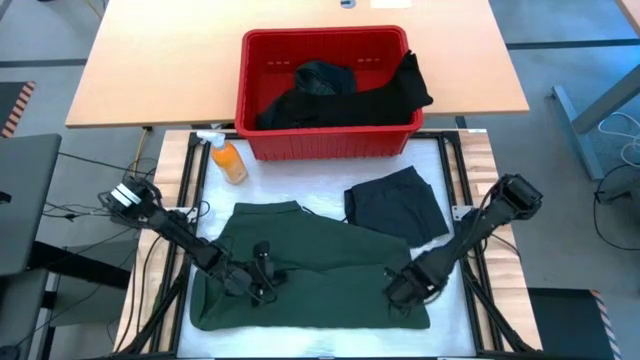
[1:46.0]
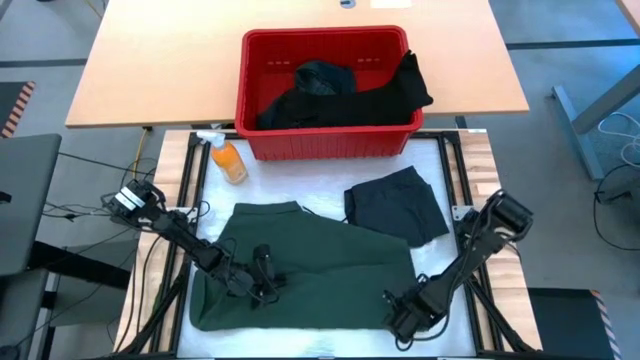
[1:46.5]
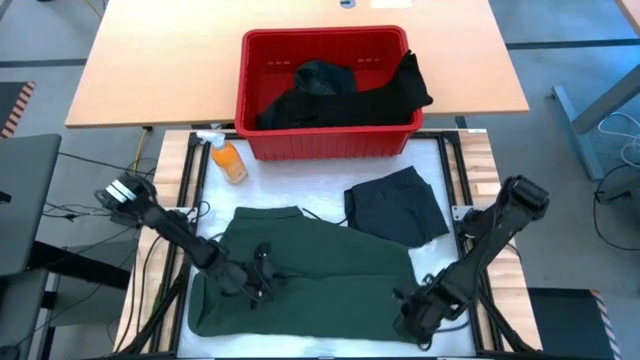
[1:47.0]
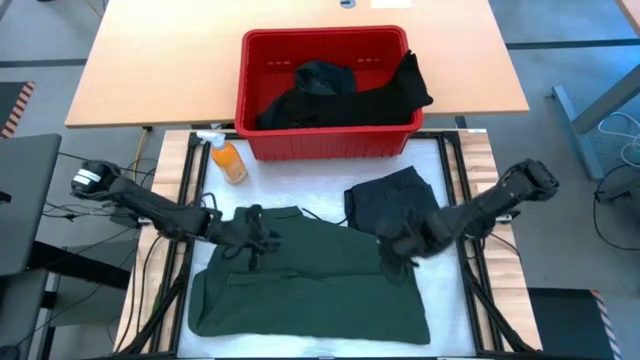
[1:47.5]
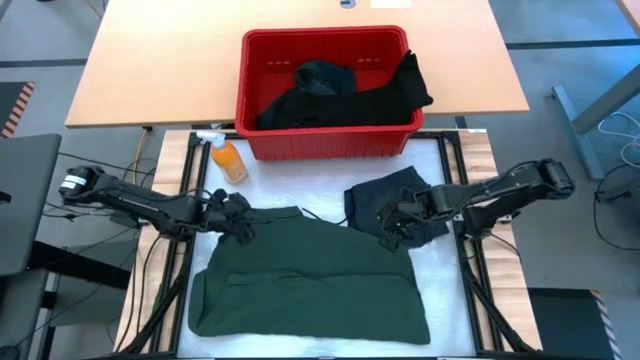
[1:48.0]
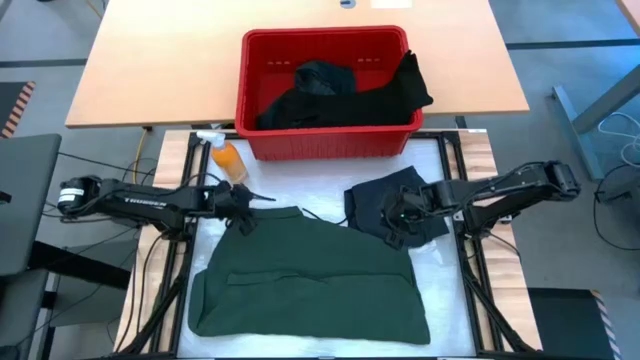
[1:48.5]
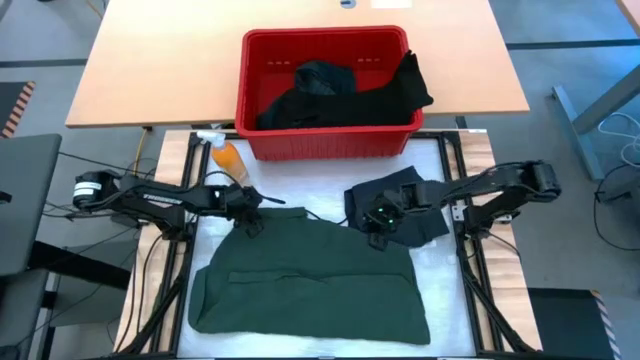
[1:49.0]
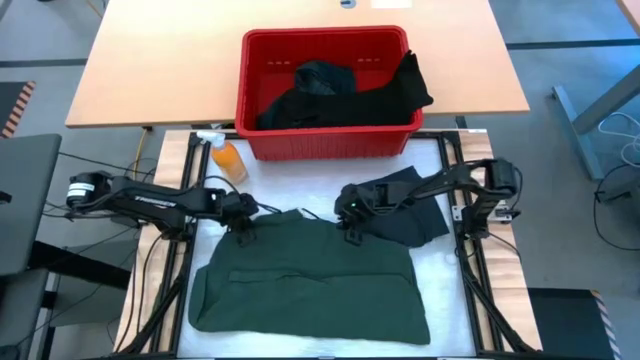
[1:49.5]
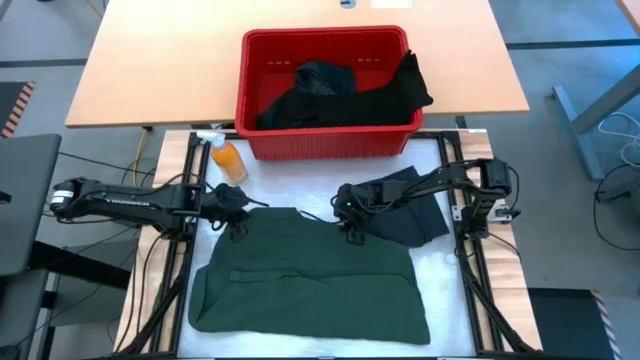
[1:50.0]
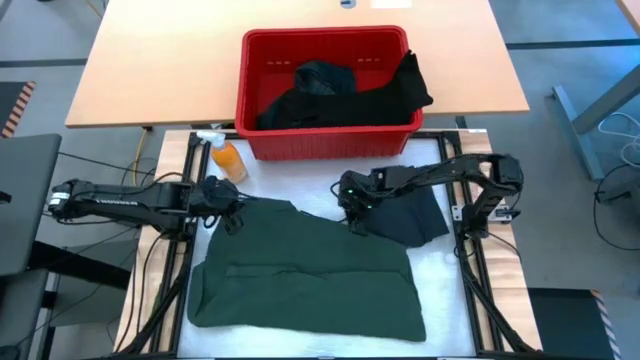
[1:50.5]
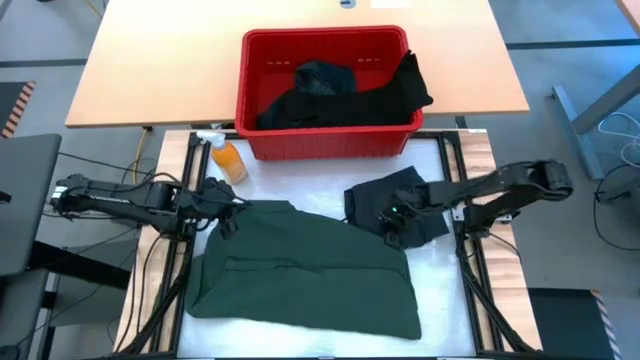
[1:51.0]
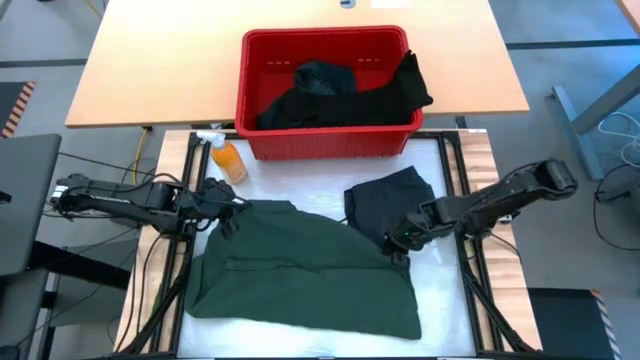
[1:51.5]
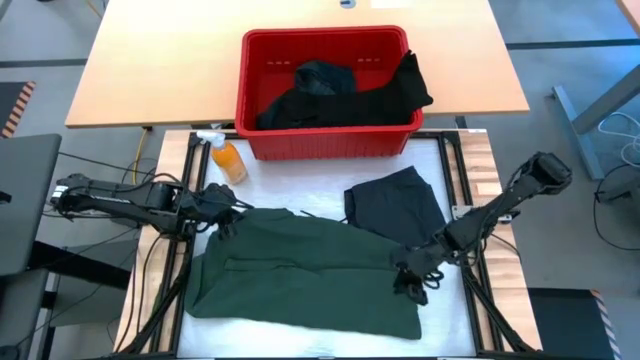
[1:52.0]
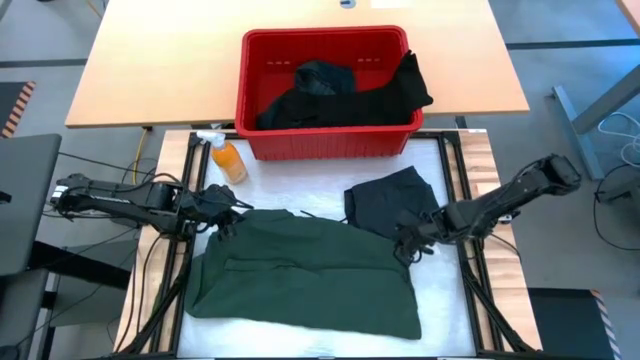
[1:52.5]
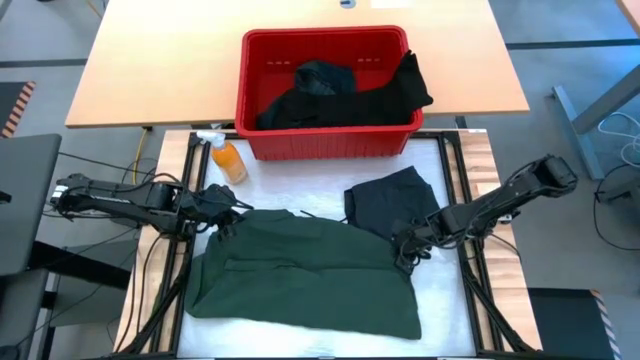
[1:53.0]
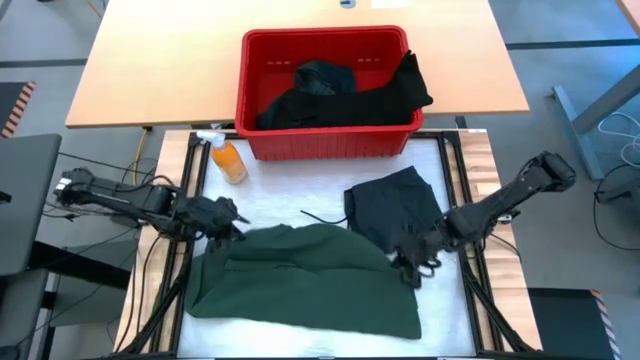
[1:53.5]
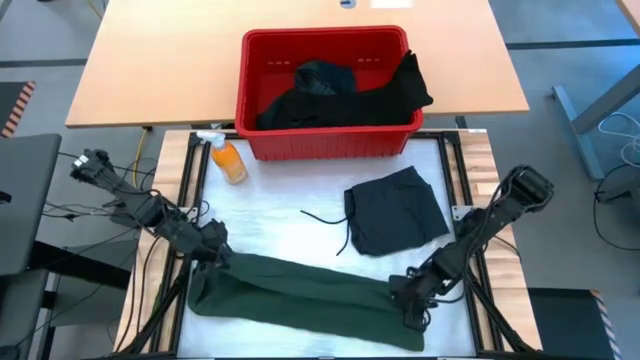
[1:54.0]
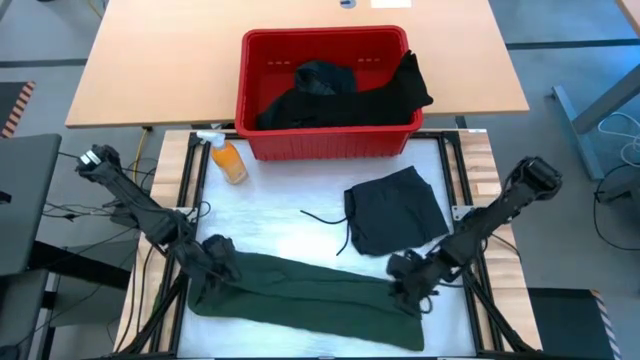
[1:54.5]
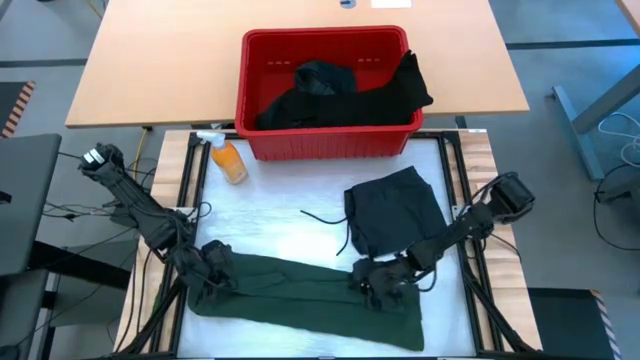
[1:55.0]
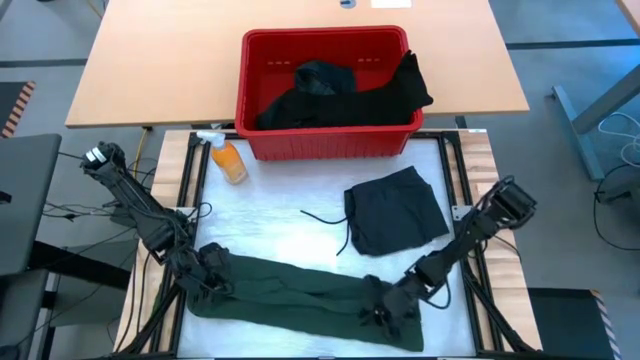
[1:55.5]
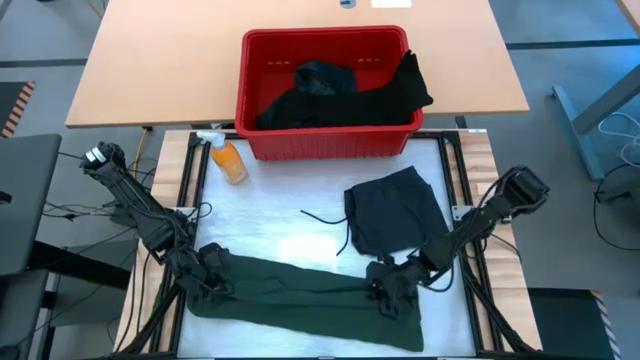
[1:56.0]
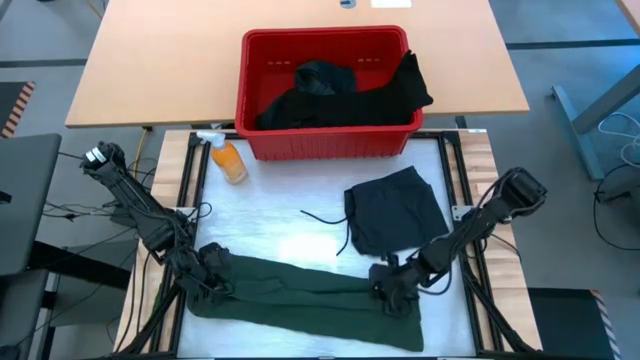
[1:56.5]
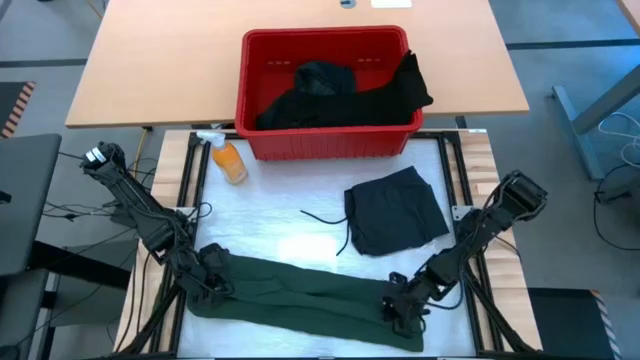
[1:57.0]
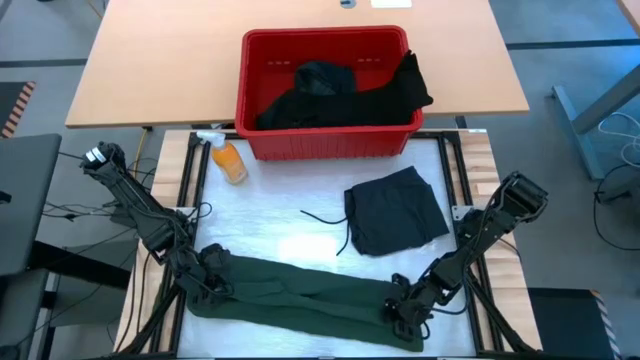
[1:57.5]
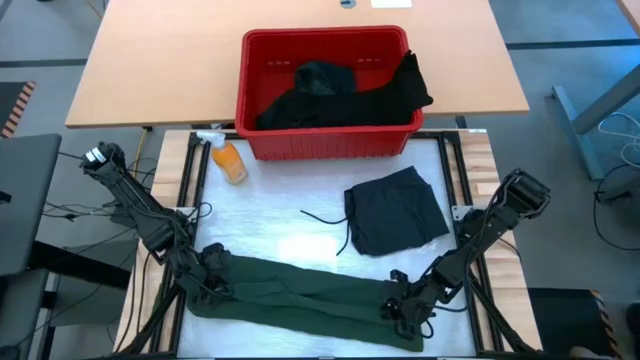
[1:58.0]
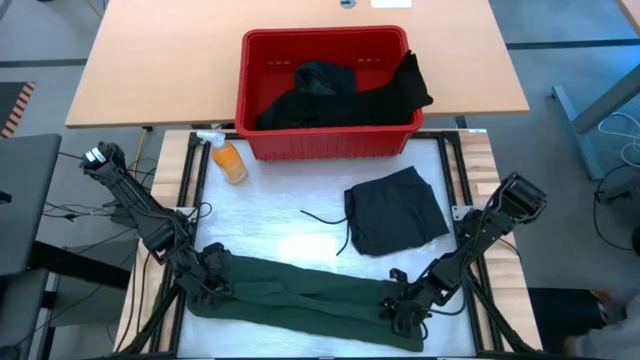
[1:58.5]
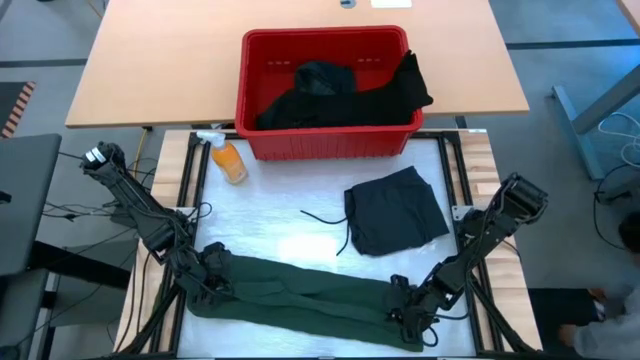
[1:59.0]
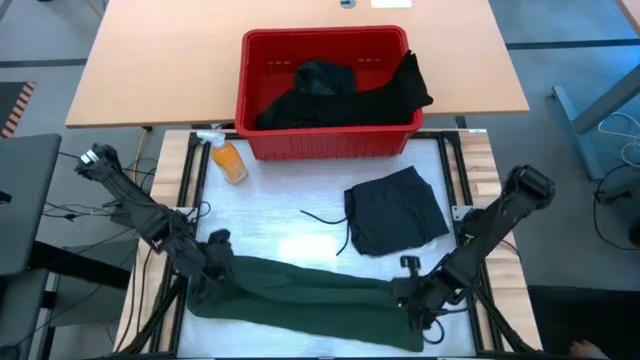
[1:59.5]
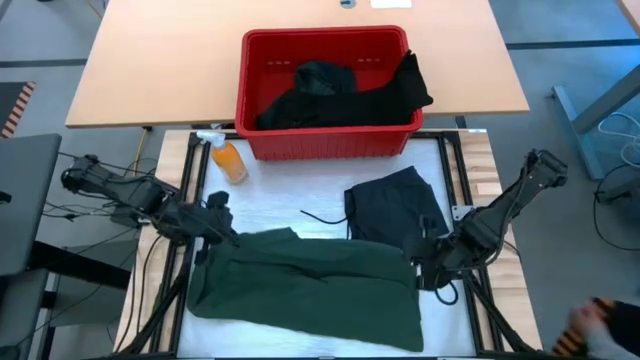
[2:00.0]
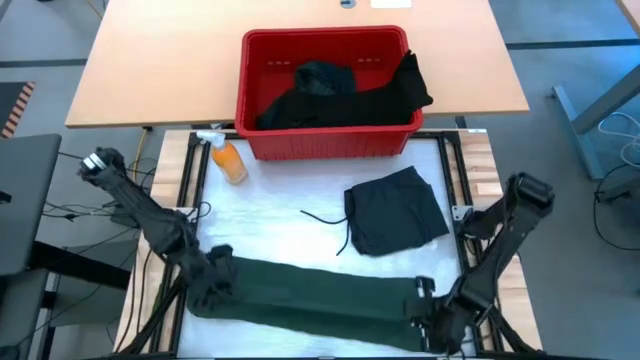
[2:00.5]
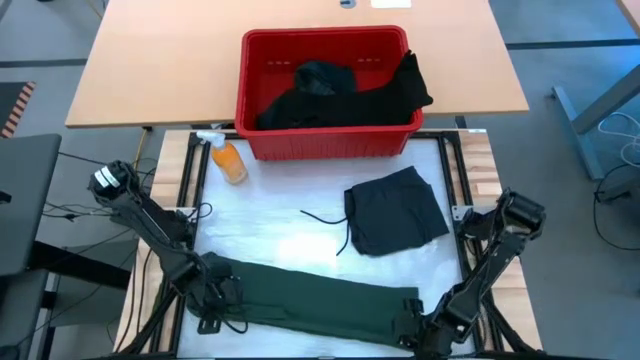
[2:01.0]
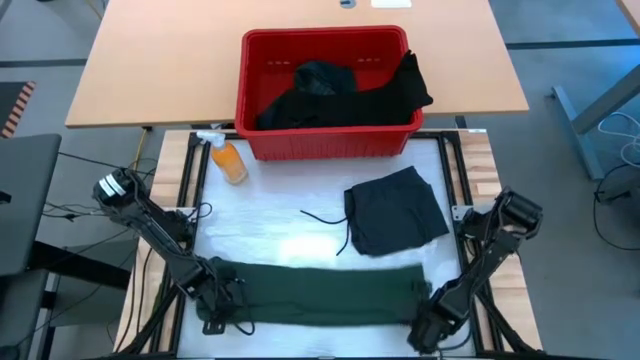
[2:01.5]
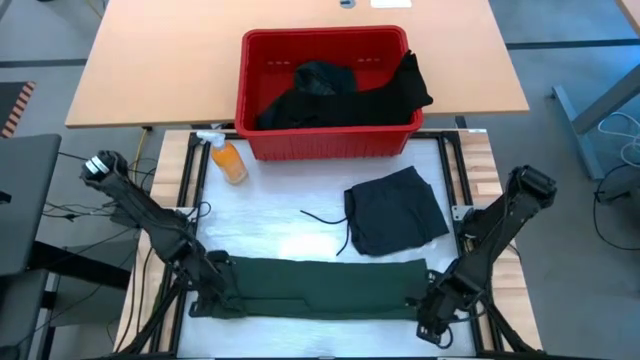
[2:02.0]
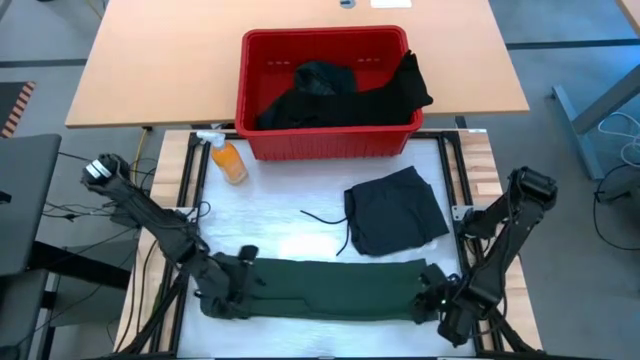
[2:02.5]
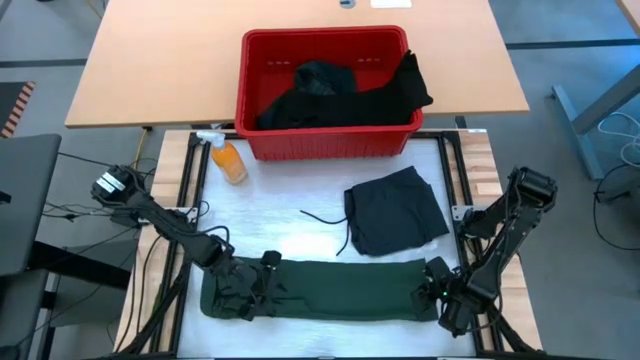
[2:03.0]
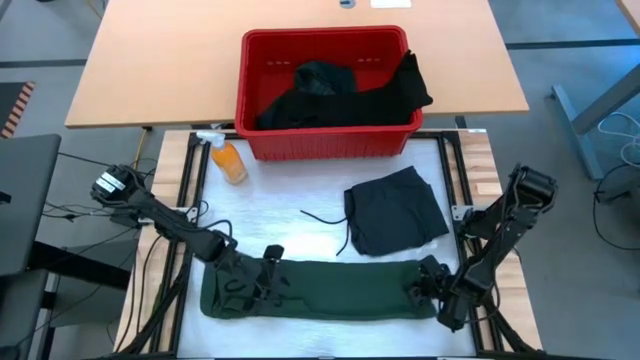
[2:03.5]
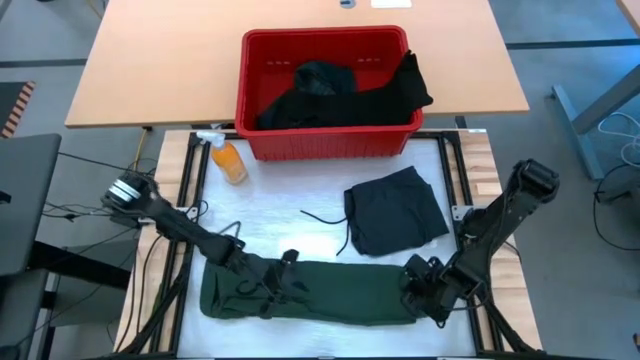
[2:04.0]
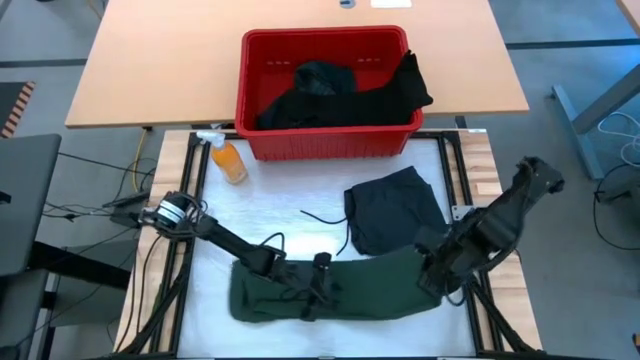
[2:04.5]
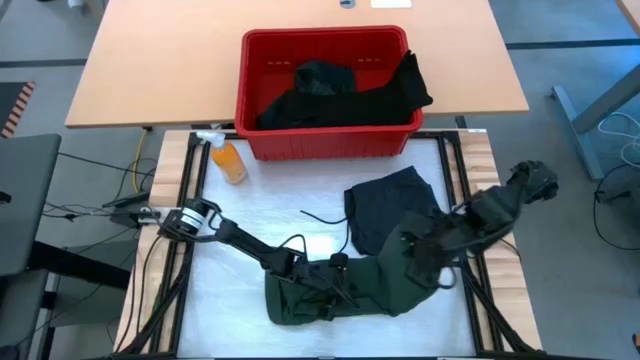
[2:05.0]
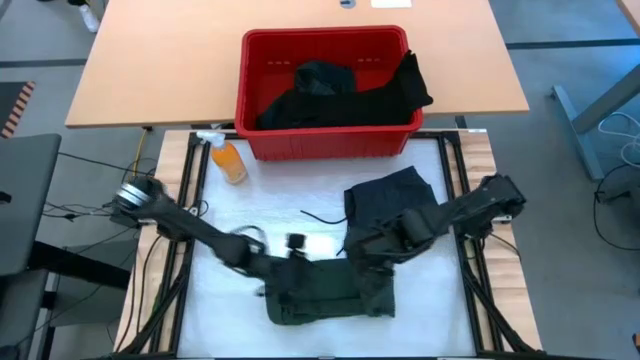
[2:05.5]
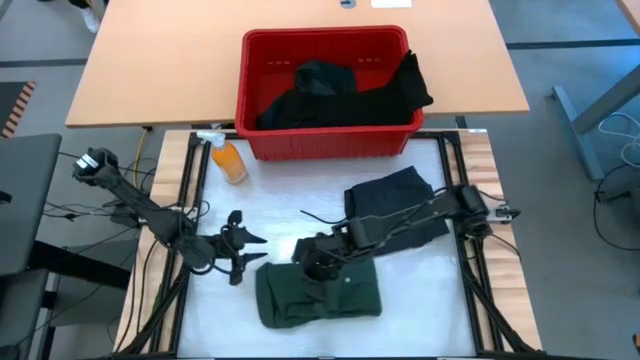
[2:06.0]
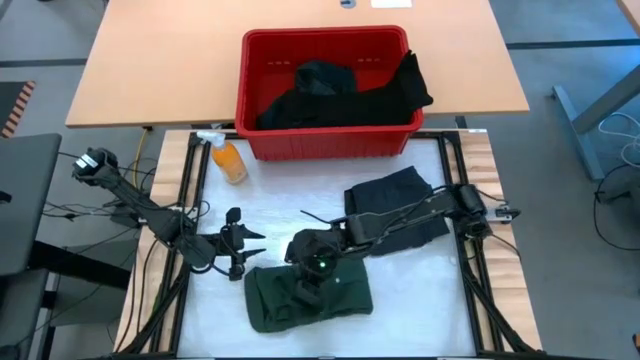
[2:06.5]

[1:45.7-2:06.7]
Task: Fold laundry
Fold the dark green shirt
